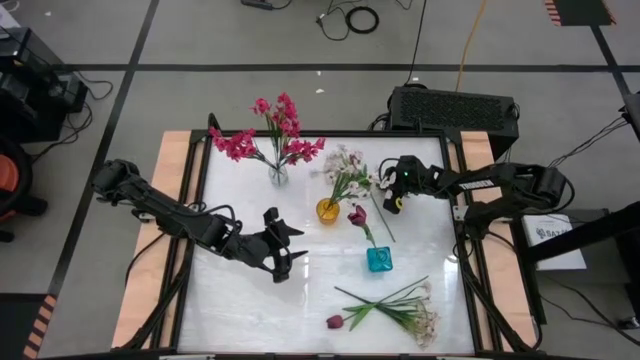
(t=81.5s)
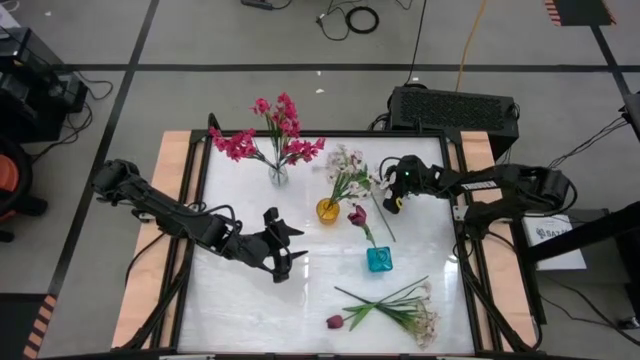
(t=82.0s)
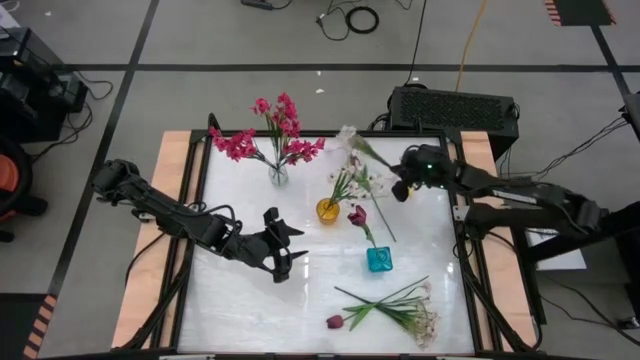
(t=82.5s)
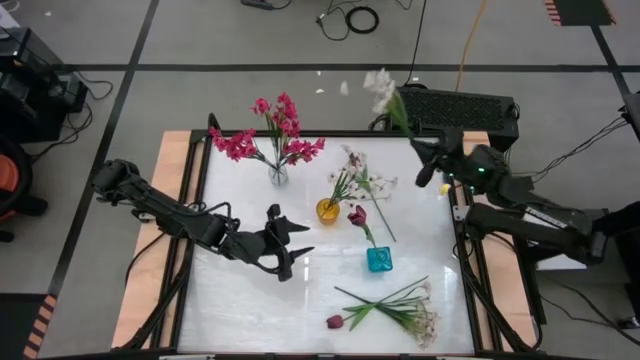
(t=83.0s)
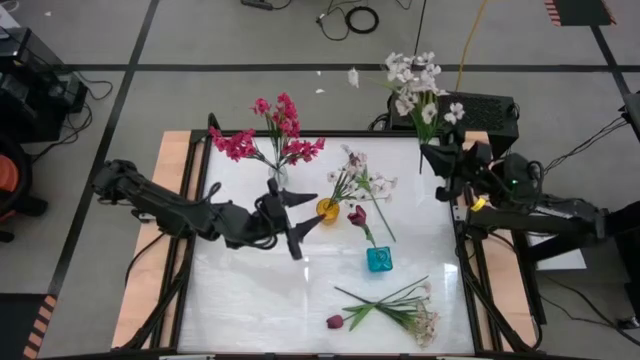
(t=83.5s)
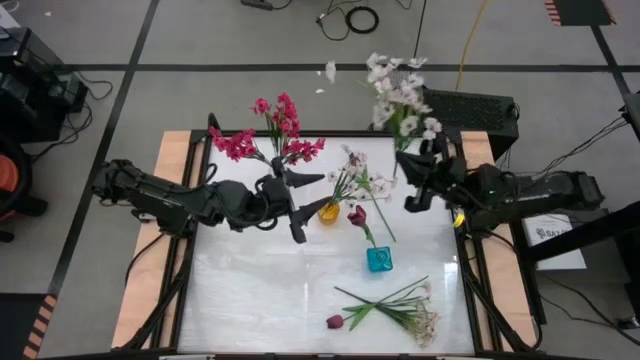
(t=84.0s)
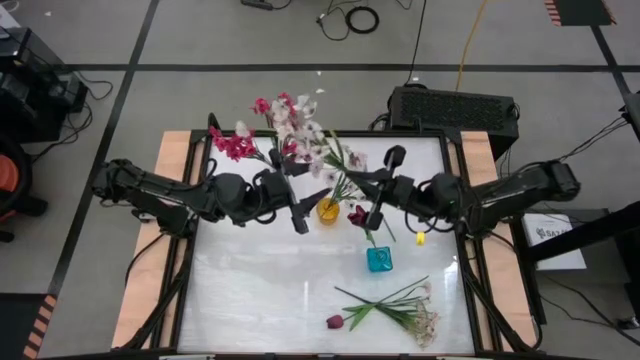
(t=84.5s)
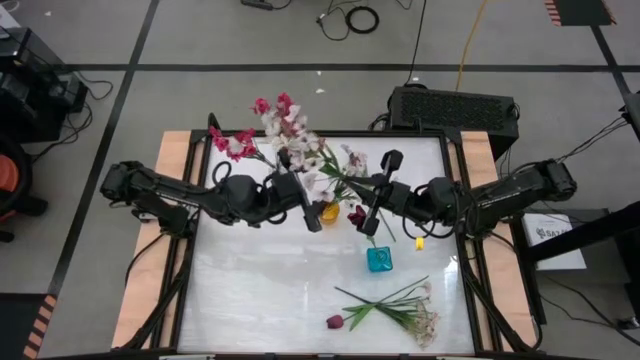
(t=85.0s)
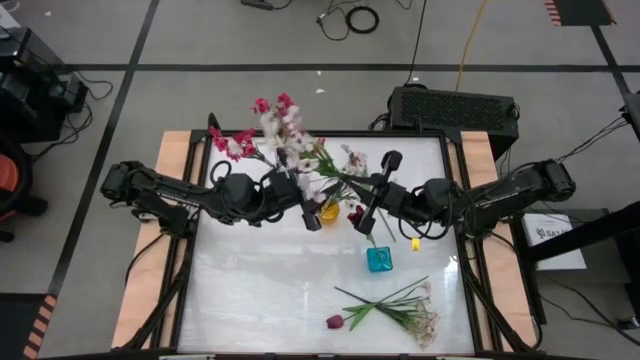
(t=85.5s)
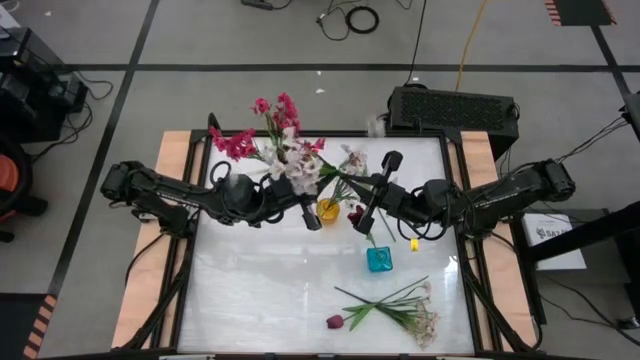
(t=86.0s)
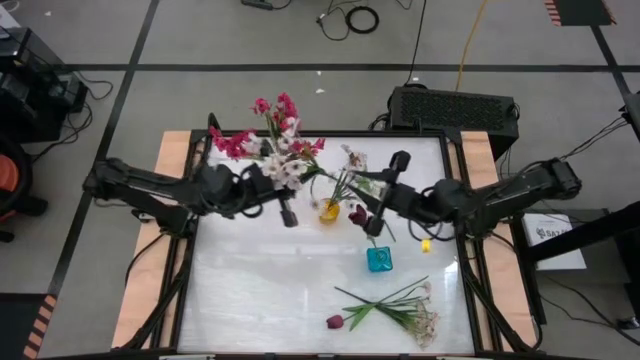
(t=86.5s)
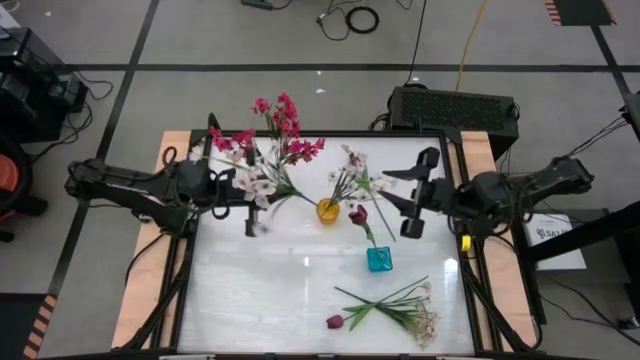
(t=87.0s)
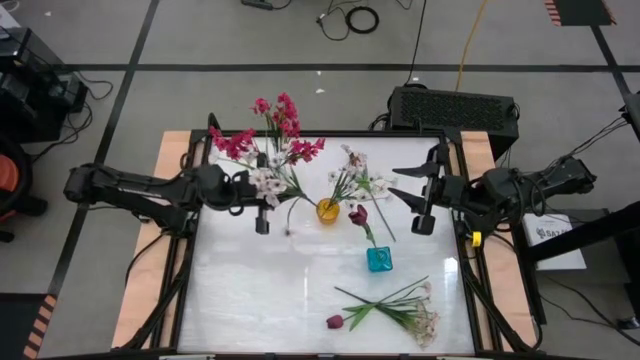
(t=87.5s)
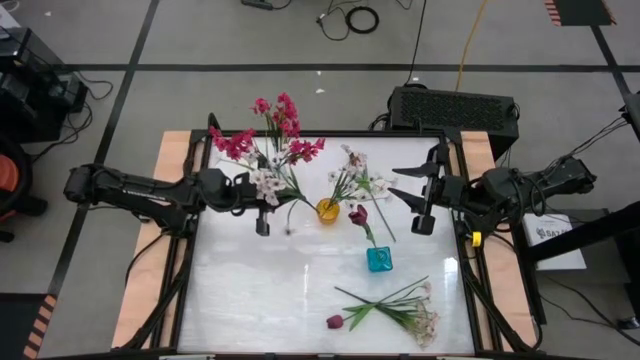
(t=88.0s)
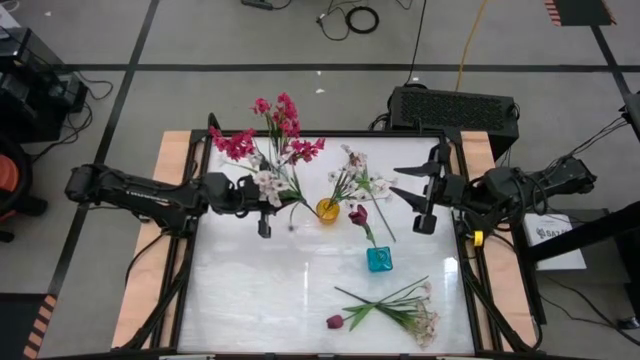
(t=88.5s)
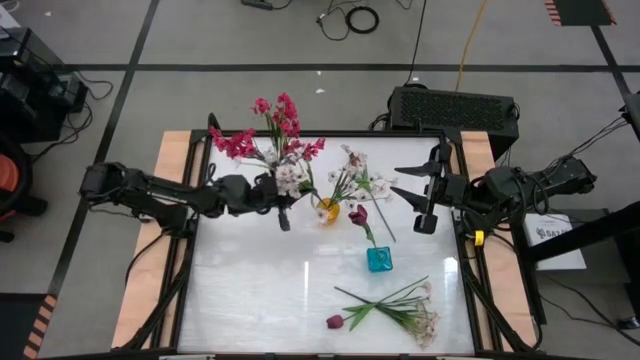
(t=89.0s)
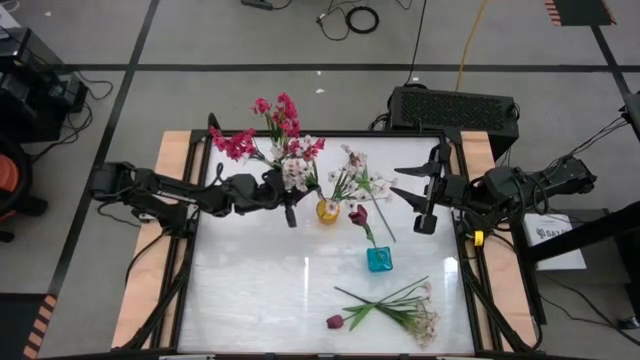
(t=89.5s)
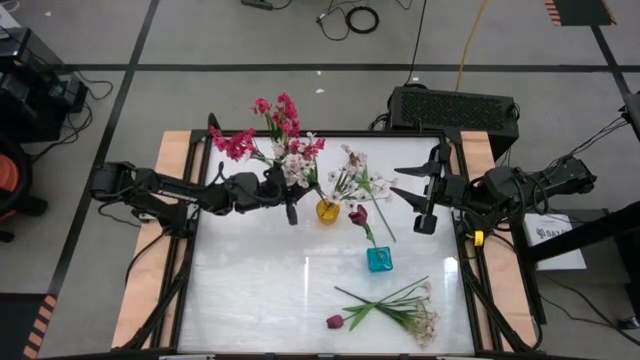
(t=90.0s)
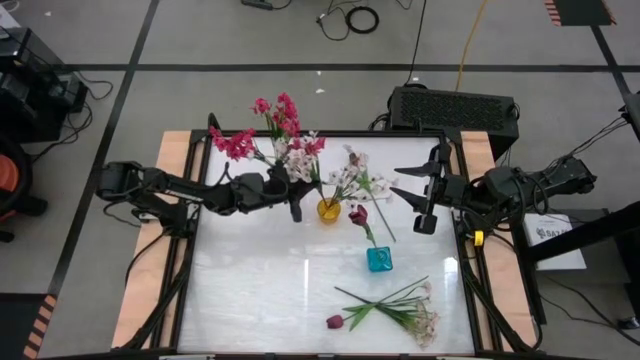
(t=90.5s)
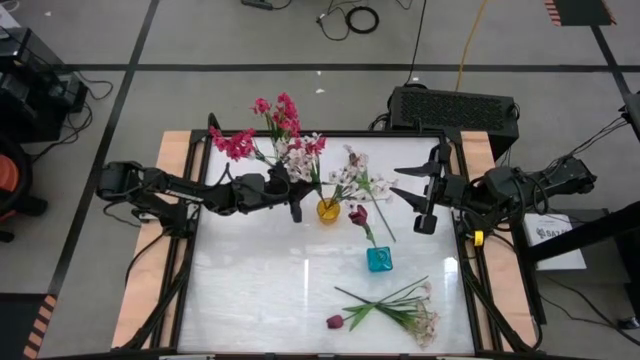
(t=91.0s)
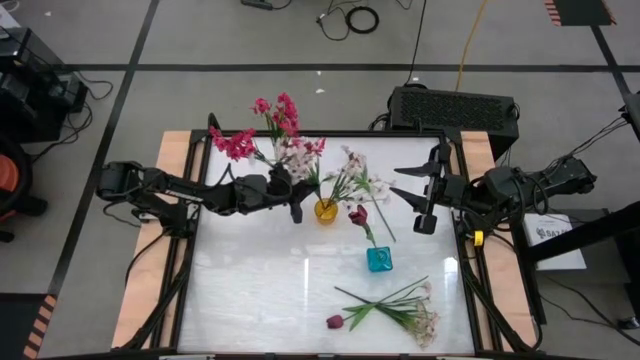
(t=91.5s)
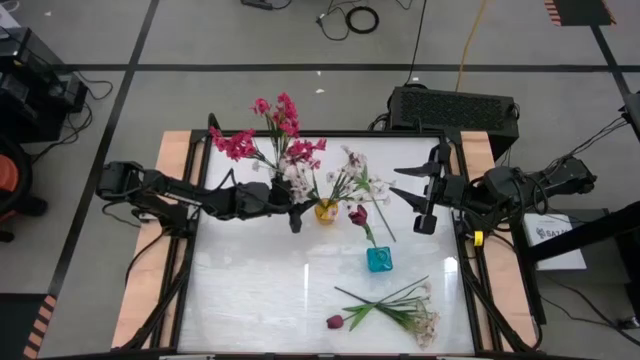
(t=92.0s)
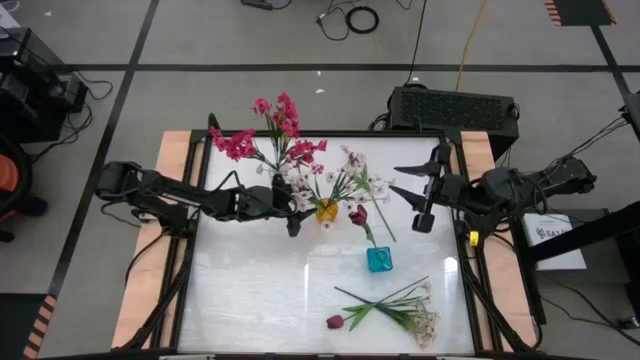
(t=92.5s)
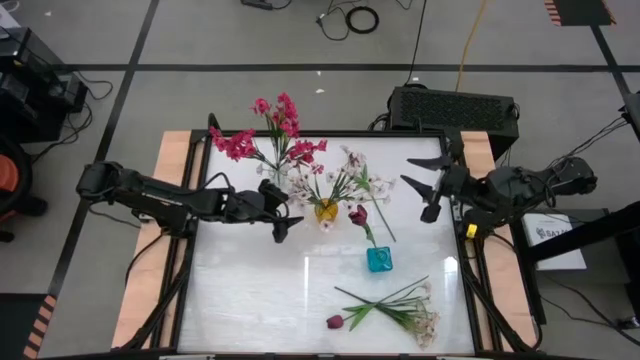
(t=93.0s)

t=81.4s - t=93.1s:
Task: Sort flowers into vase by color
Put the top white flower into the yellow vase

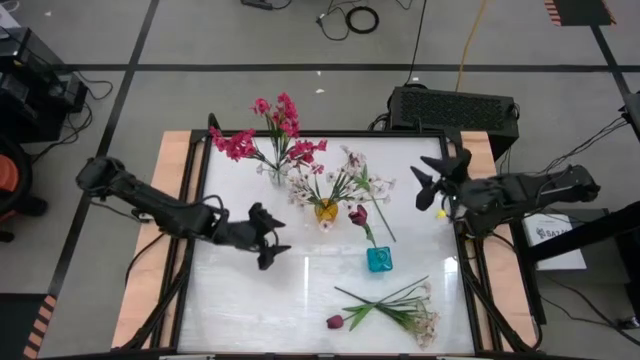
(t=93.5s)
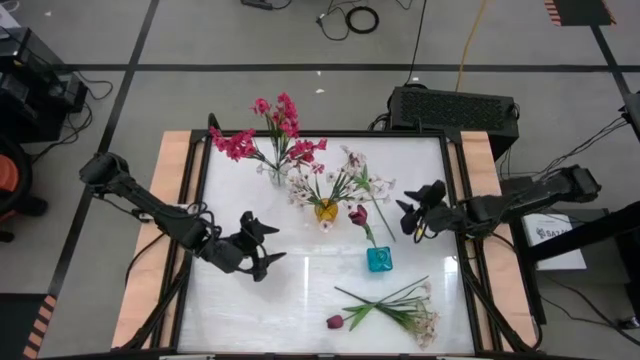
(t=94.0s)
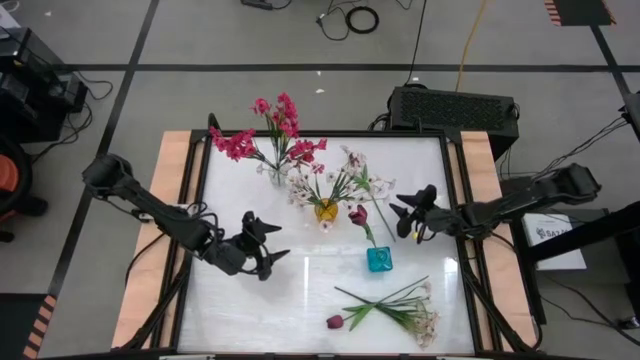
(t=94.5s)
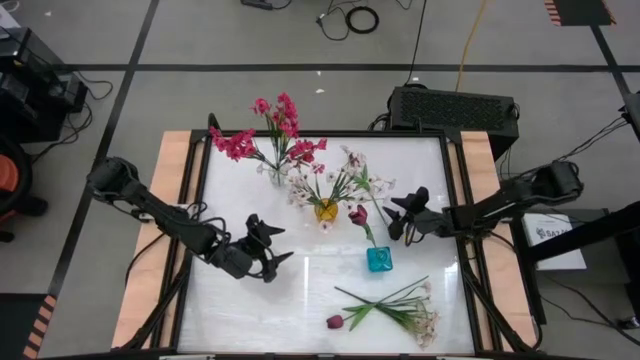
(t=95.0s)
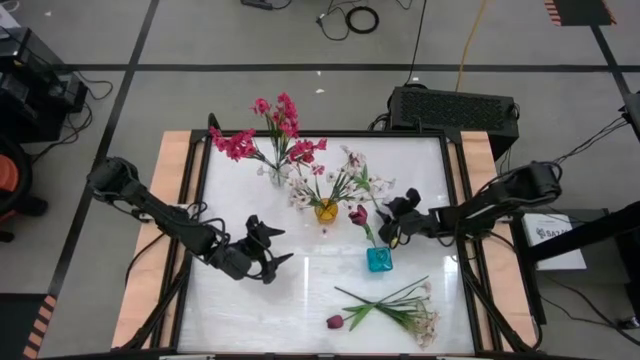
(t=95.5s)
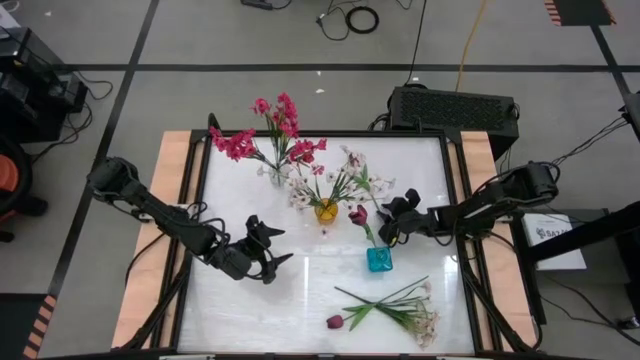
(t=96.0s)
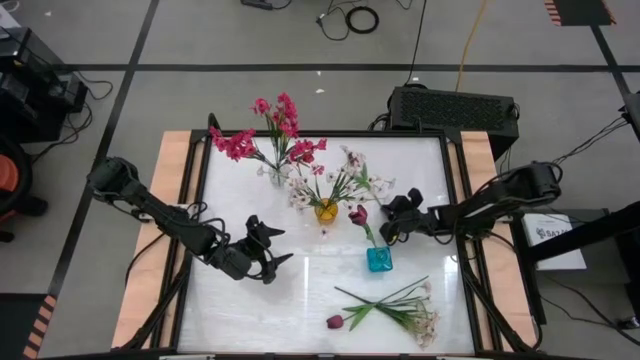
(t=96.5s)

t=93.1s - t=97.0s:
Put the top red flower into the blue vase

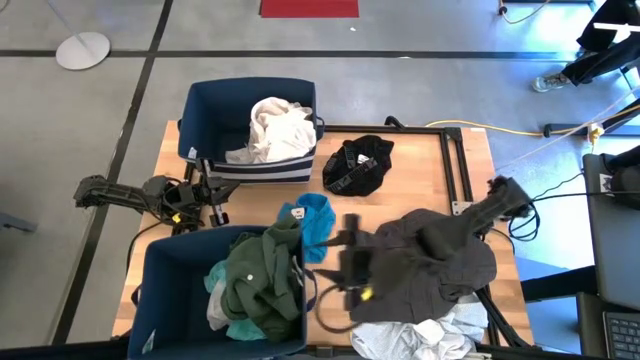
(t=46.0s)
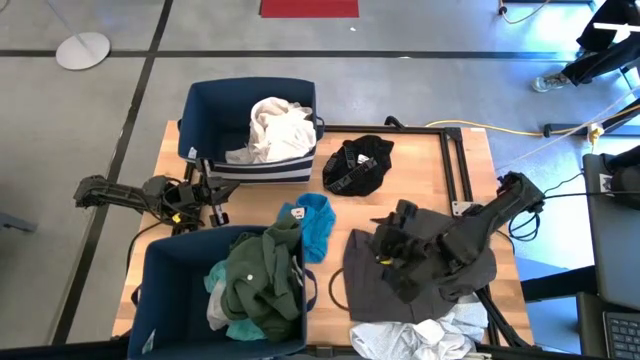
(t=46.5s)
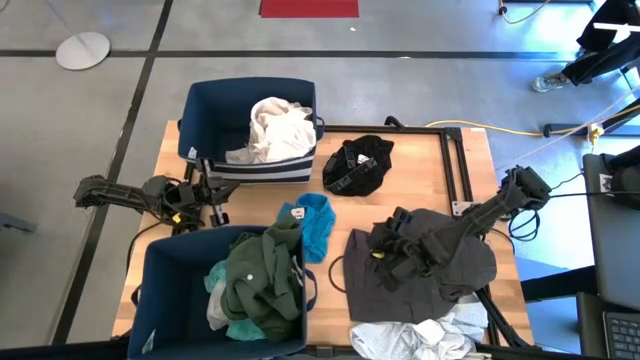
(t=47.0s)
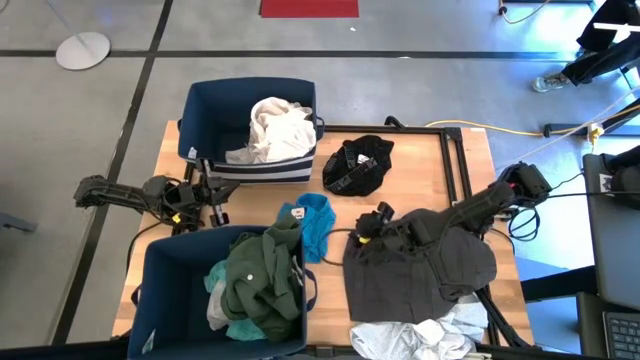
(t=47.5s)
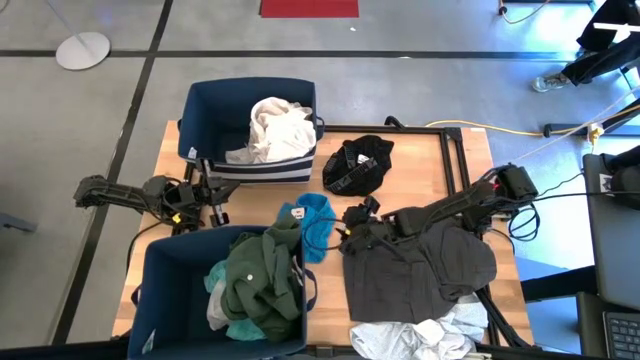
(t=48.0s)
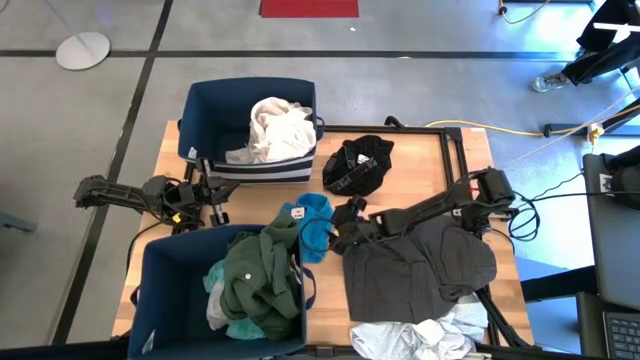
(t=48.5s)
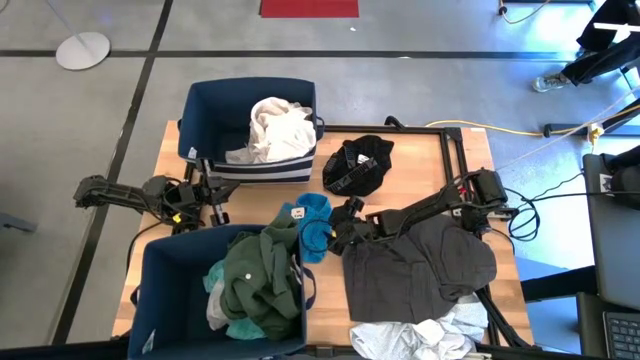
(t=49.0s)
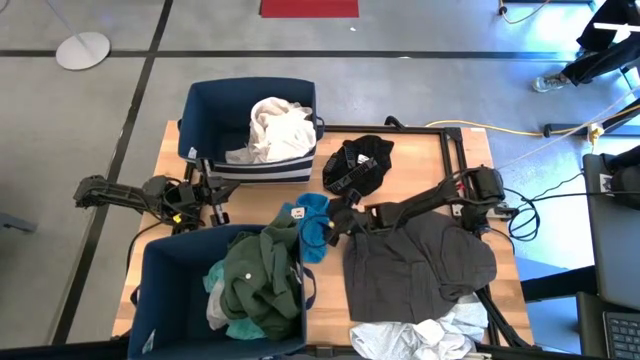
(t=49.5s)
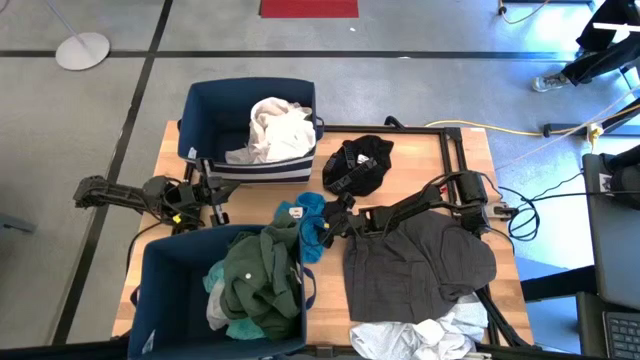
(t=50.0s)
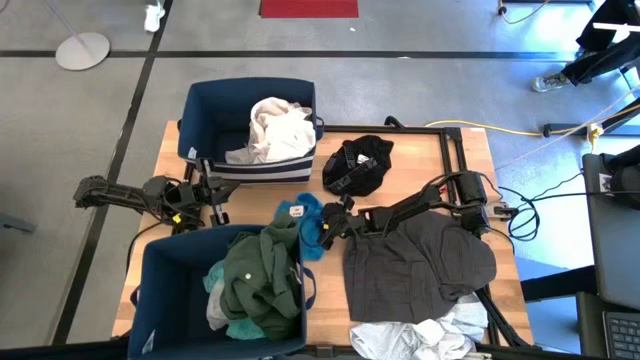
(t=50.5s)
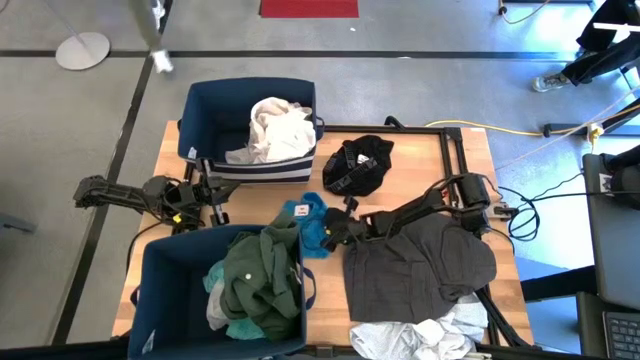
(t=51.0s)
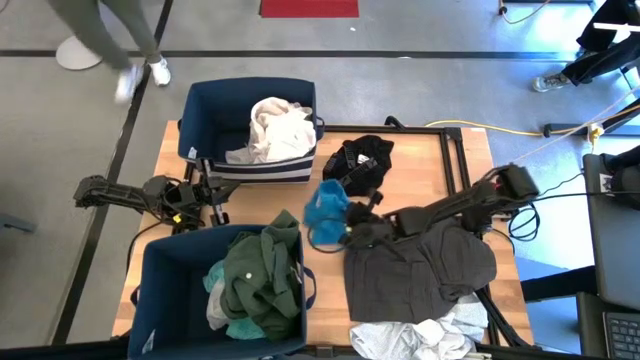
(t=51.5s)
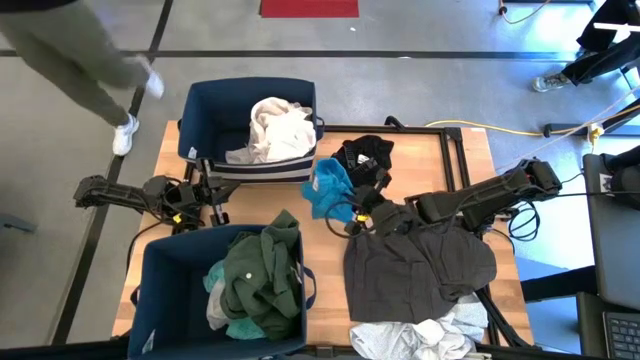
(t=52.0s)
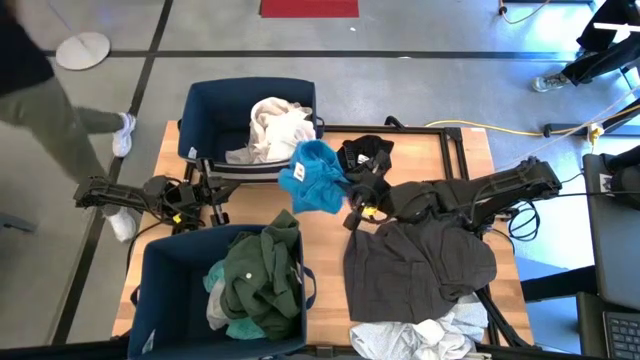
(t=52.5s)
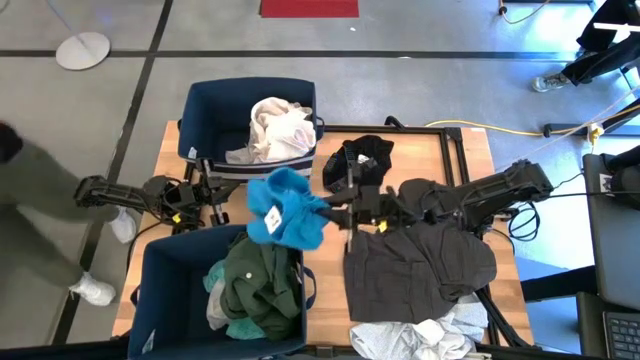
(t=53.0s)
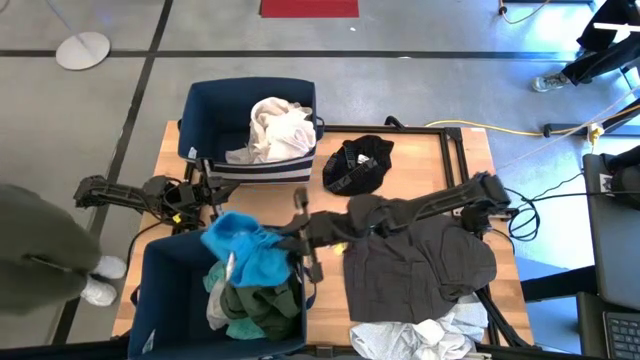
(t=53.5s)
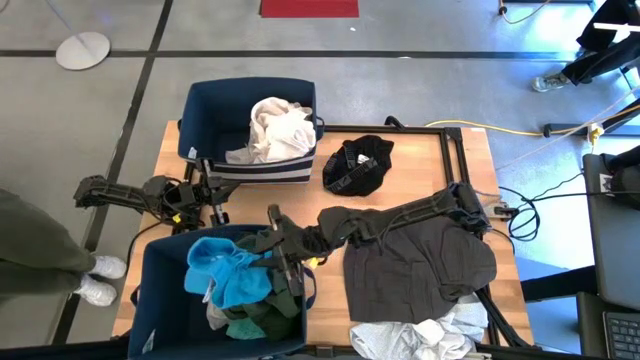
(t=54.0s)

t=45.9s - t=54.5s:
Task: Sort clothes
Put the blue shorts into the bottom blue laundry bin
